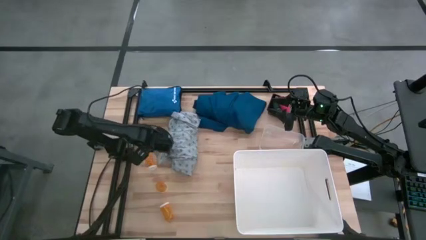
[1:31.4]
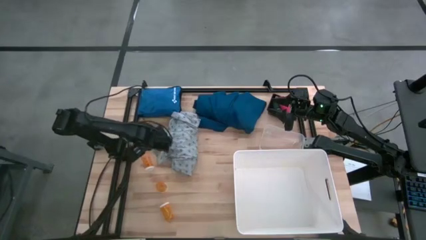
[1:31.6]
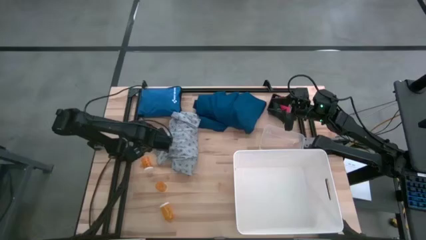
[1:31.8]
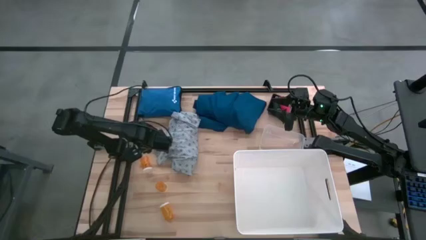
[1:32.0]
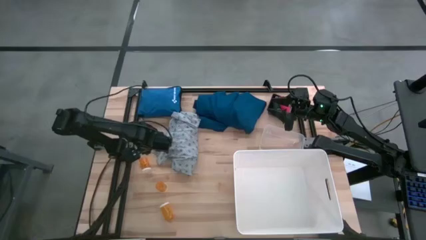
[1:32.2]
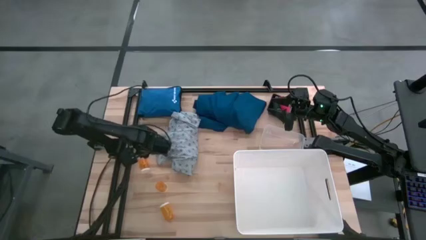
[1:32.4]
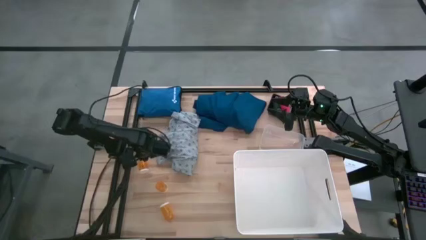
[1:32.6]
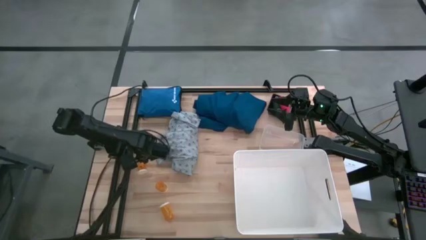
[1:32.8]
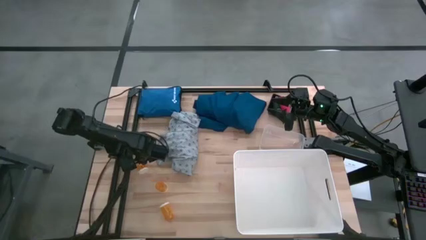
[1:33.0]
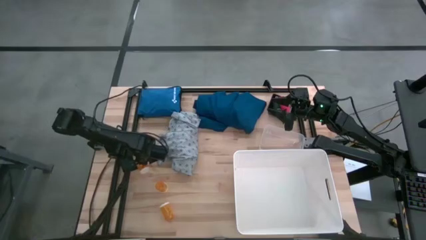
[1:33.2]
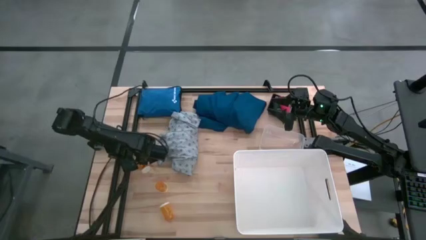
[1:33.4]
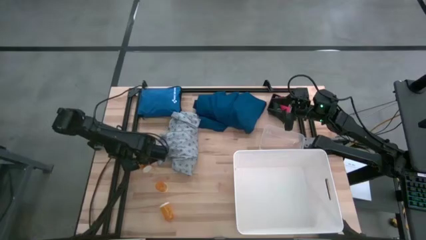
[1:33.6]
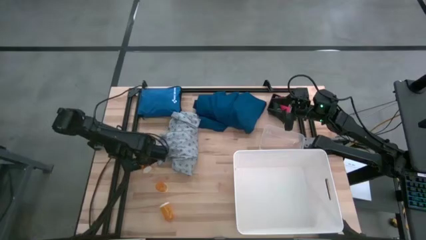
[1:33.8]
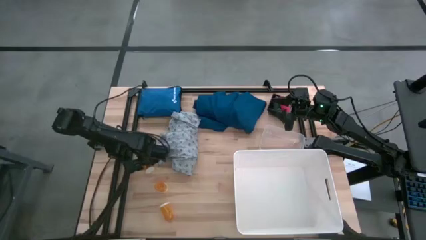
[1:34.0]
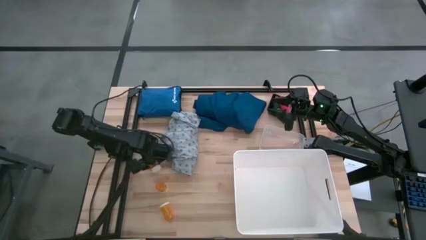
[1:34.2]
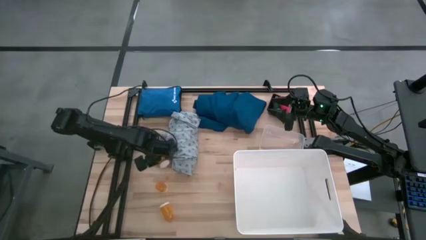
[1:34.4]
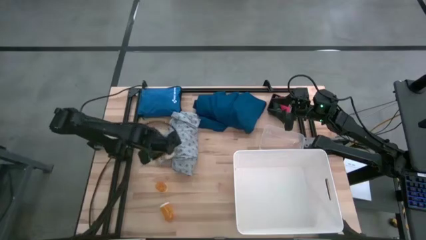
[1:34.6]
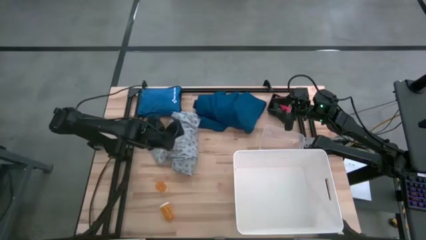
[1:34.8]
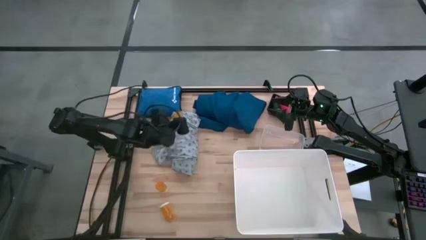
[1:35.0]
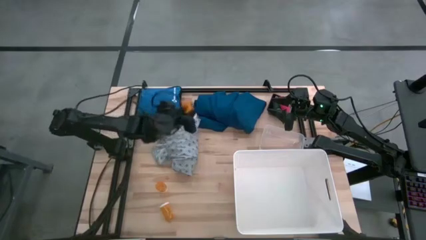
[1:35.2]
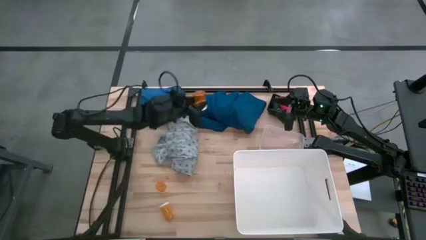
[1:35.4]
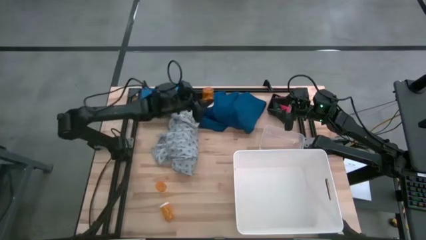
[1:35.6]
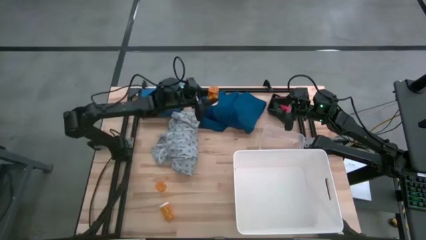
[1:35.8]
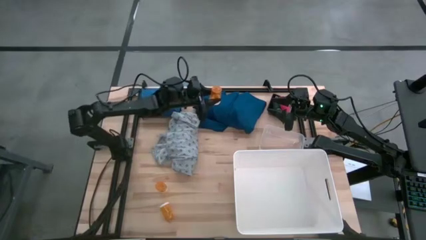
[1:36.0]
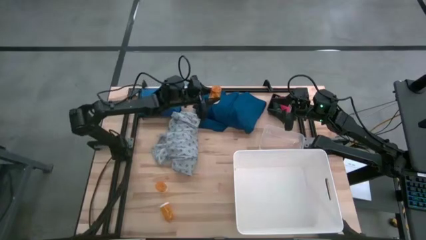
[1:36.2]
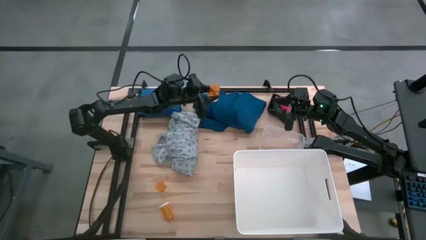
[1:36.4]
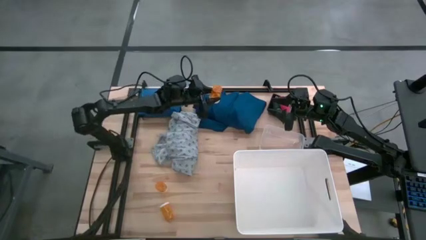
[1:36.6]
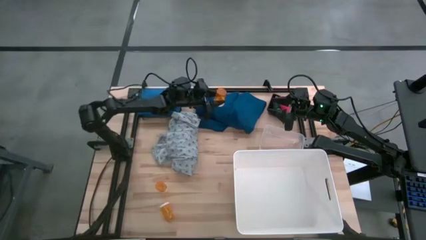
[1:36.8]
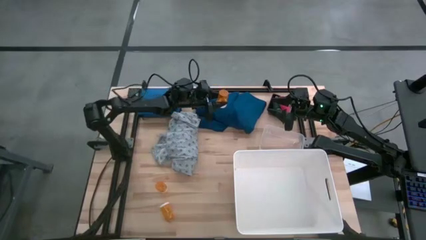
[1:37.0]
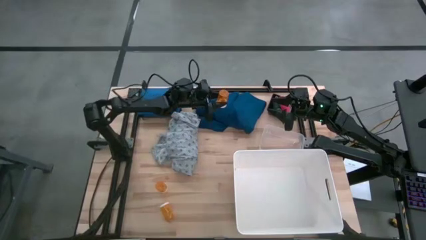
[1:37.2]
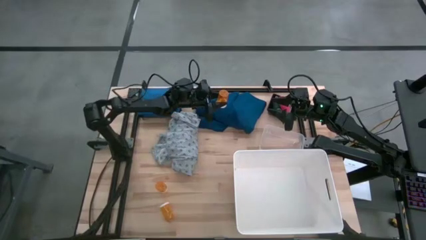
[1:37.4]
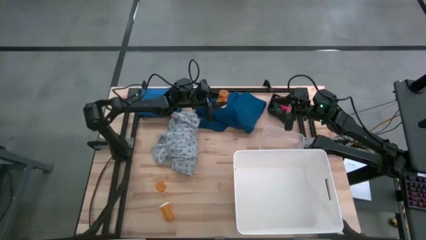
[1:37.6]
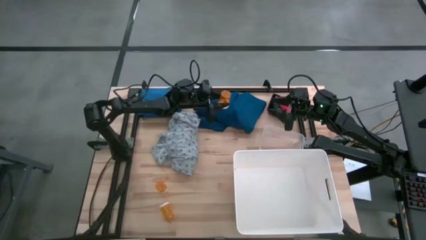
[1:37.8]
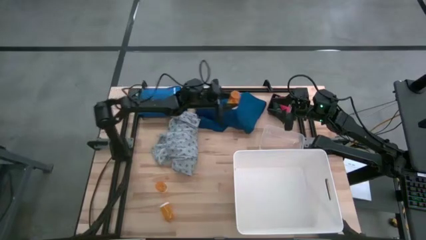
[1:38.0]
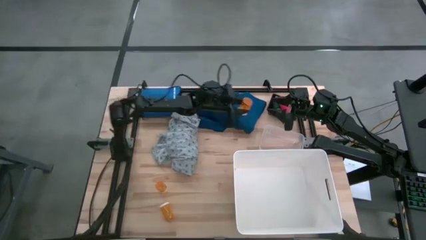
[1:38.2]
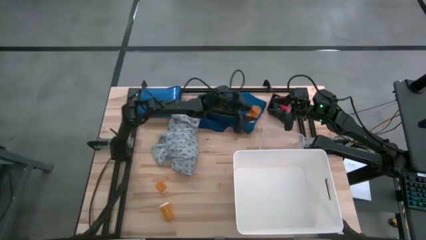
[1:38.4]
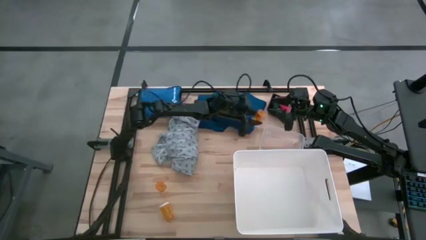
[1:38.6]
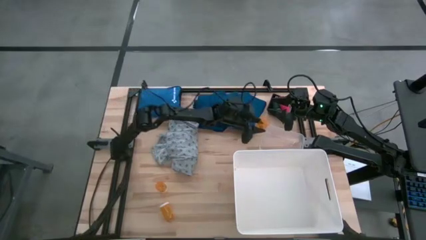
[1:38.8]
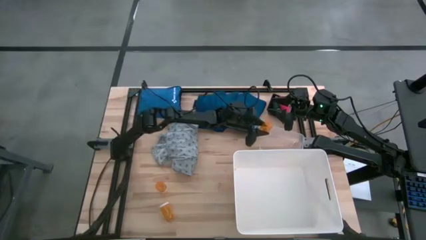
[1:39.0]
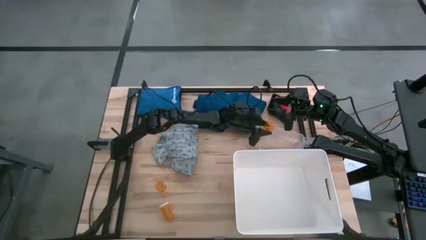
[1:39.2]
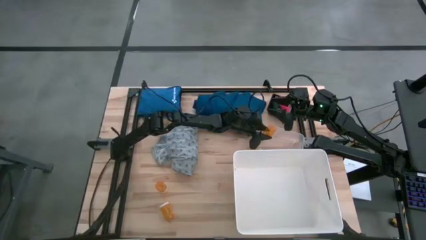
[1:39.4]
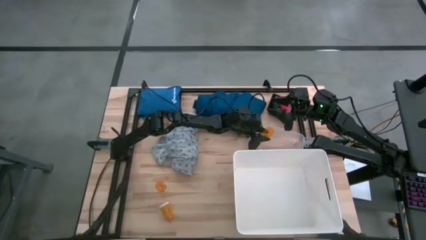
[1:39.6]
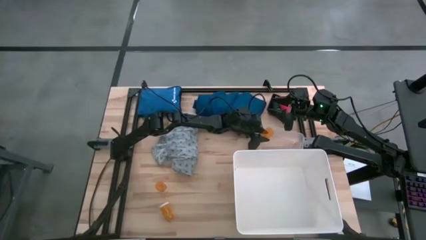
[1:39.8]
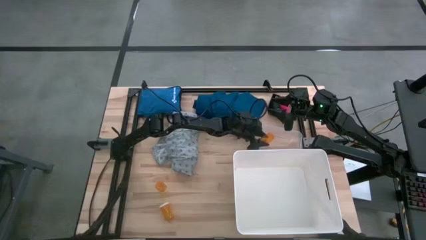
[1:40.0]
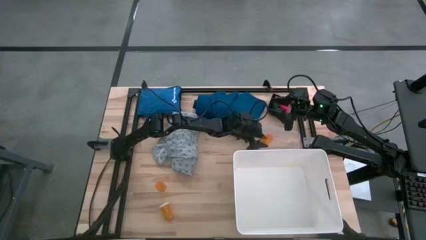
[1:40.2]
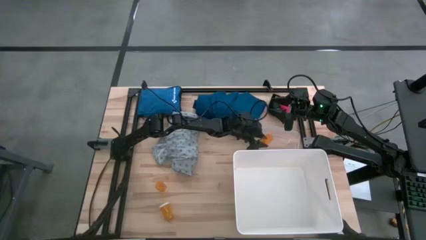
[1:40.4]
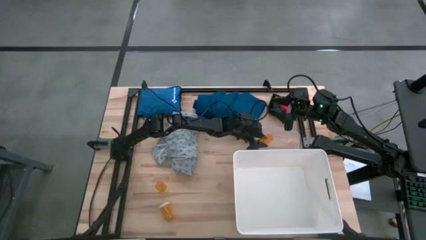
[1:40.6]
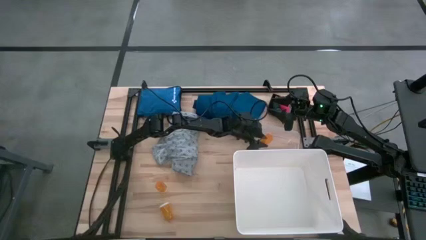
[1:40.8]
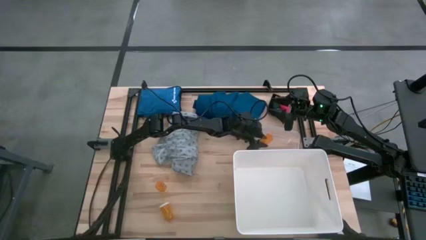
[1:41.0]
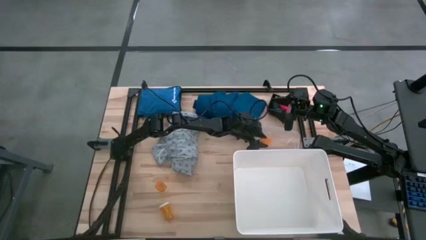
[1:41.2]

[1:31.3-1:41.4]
Task: Pick & place medical supplies in basket/bin
Put the top orange pill bottle into the transparent bin

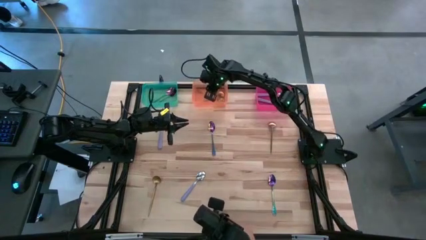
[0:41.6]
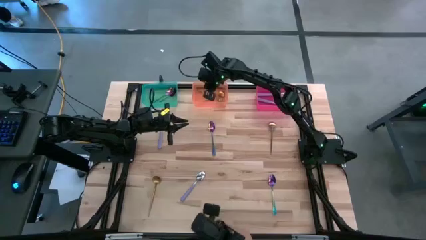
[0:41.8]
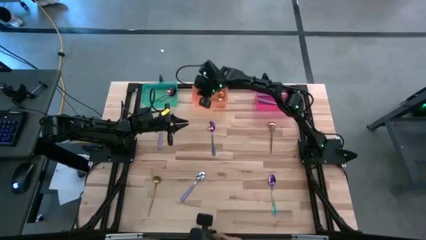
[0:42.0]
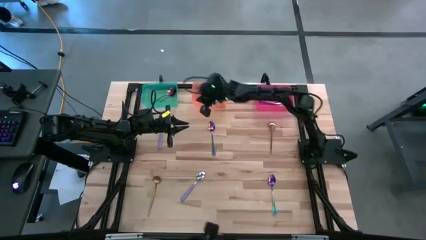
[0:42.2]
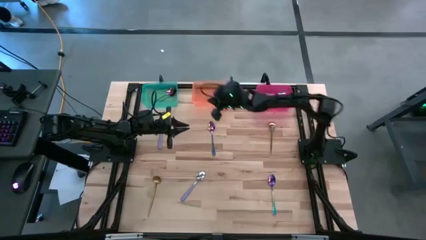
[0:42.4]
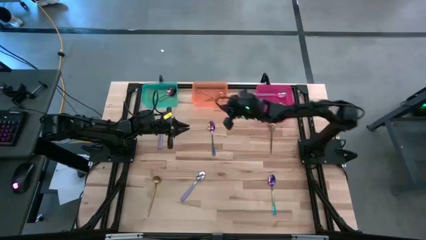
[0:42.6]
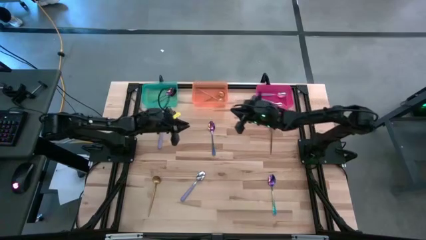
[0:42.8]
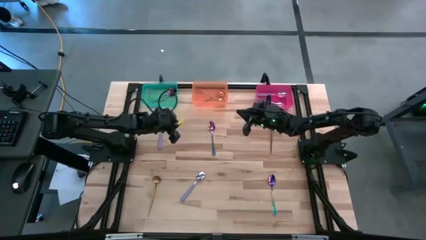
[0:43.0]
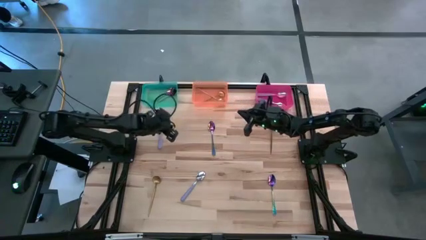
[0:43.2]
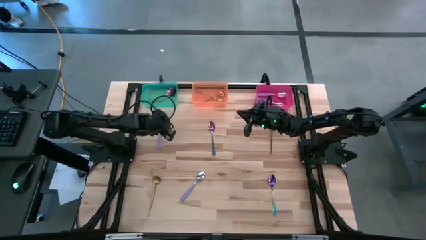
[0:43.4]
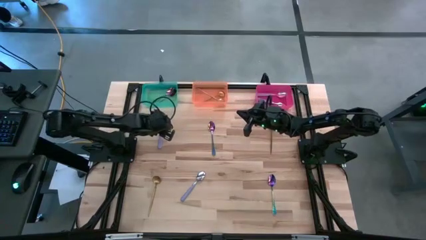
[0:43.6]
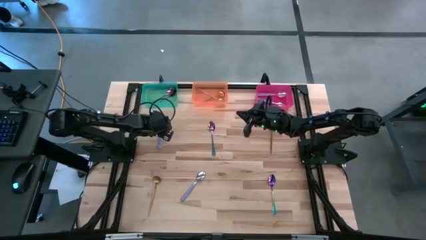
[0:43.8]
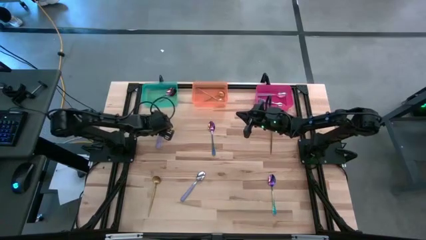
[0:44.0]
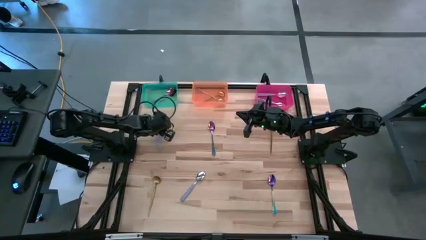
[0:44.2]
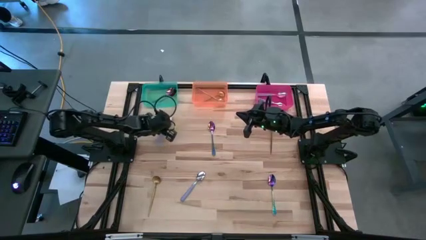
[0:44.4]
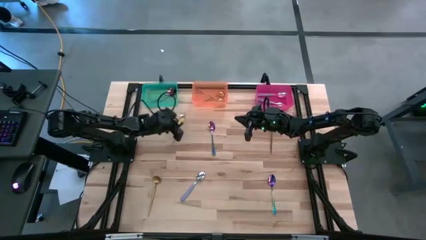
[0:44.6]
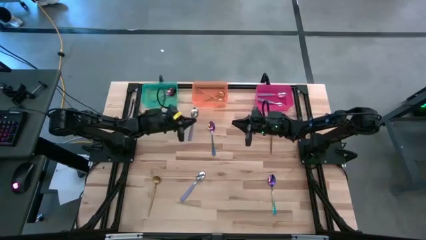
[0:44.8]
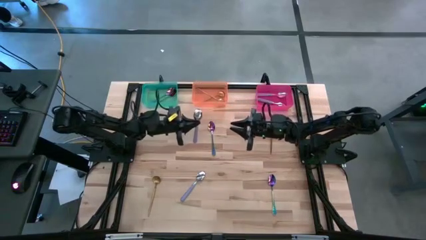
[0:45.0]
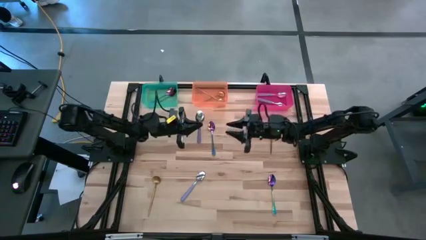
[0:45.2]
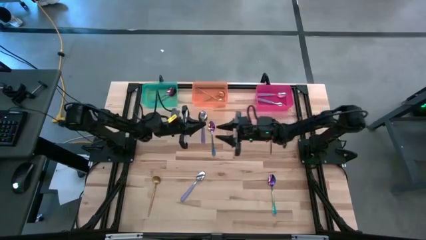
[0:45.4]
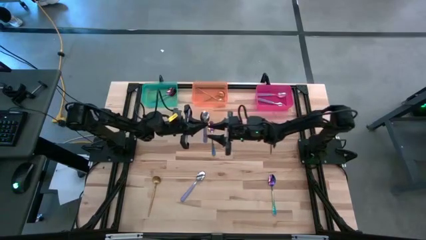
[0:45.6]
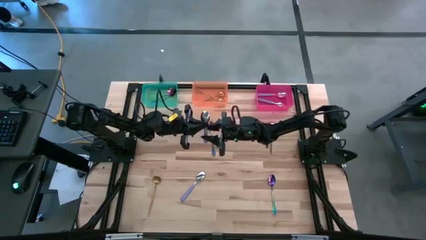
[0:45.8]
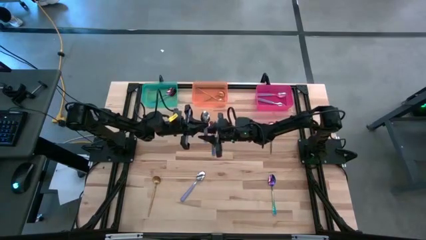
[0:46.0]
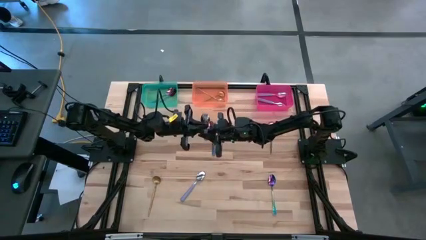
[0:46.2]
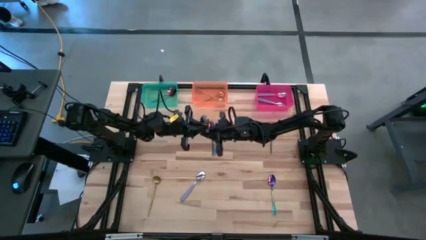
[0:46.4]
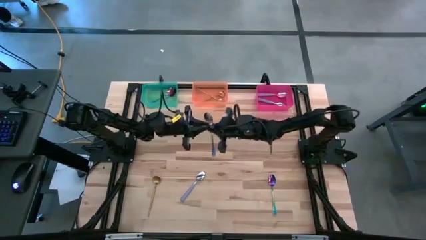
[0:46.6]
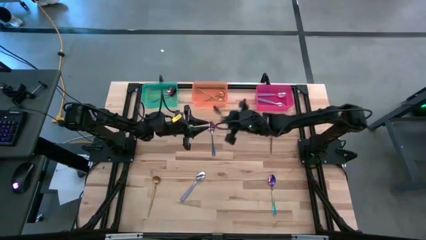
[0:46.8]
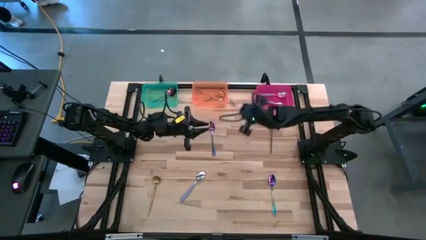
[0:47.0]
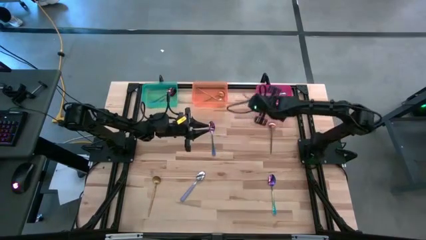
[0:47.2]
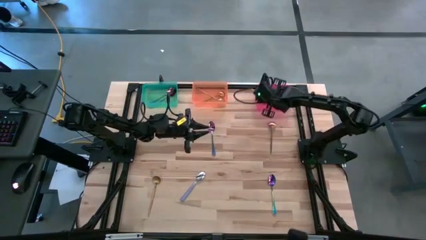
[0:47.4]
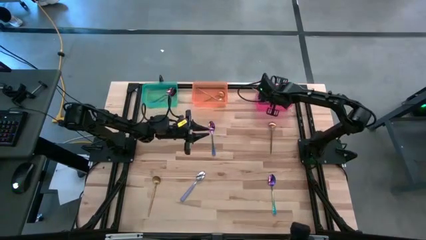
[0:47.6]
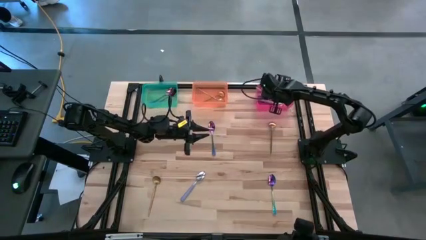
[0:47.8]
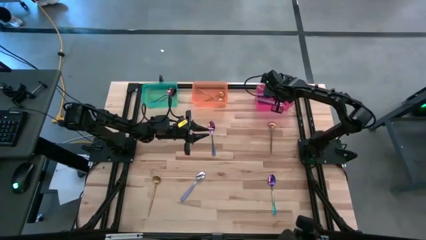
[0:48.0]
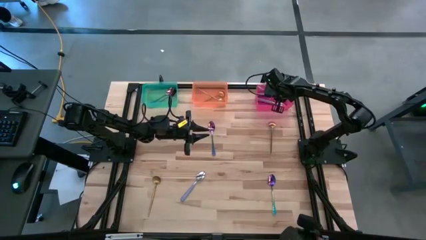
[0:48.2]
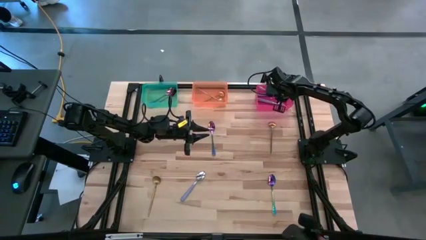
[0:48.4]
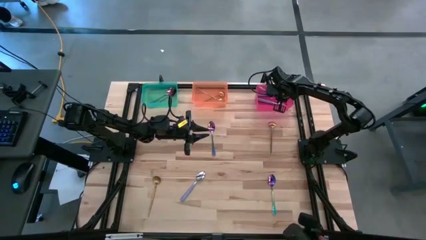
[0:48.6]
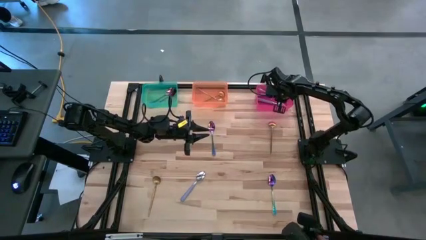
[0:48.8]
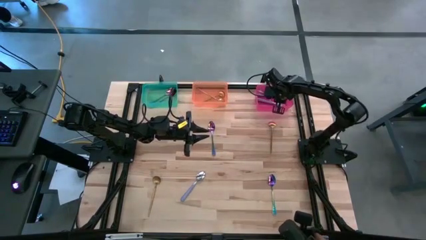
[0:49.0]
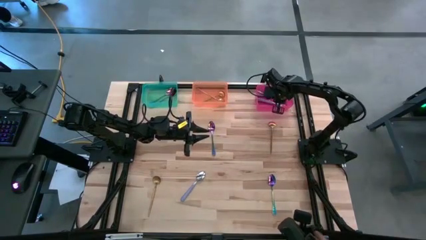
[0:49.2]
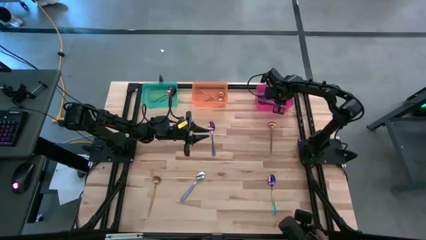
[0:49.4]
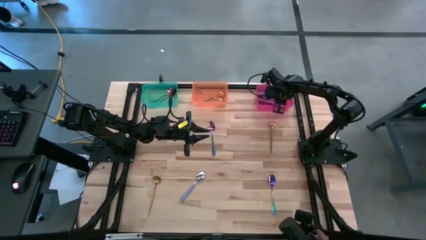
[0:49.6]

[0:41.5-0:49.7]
Task: Sort silverware by color (type)
Put the purple spoon into the red bin
